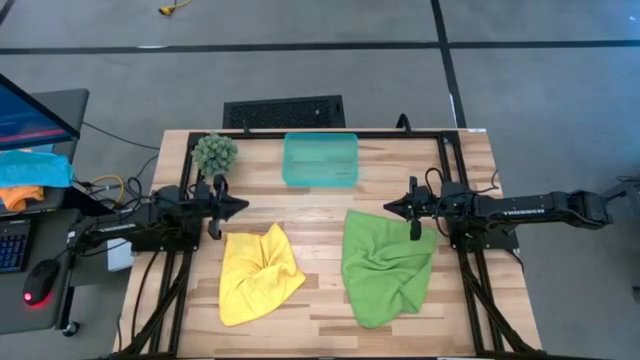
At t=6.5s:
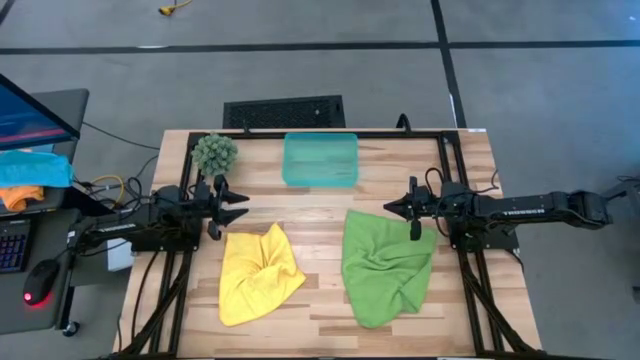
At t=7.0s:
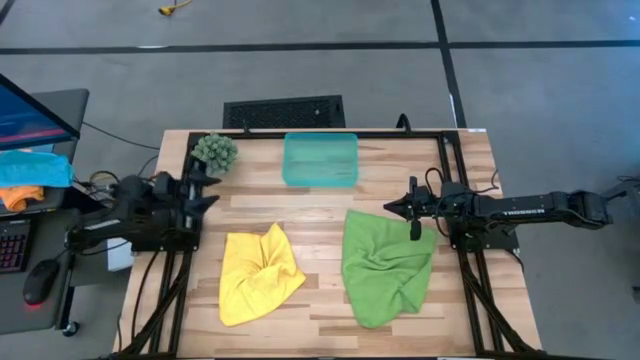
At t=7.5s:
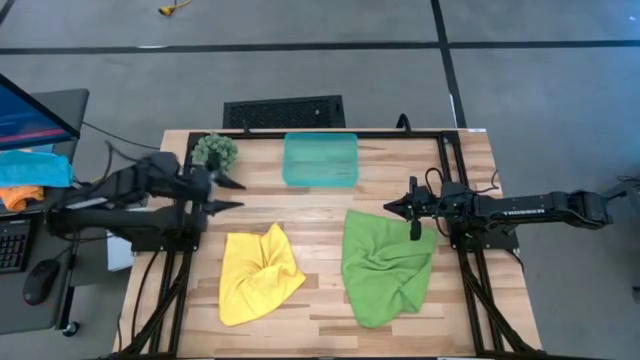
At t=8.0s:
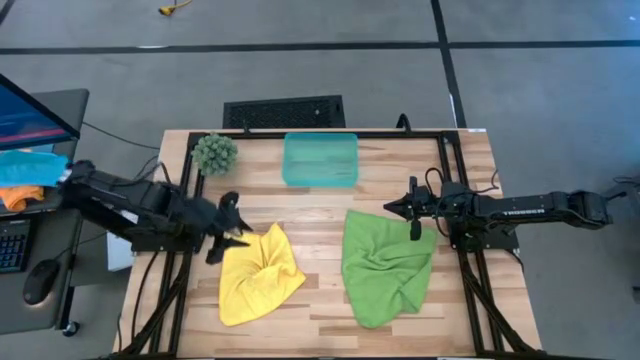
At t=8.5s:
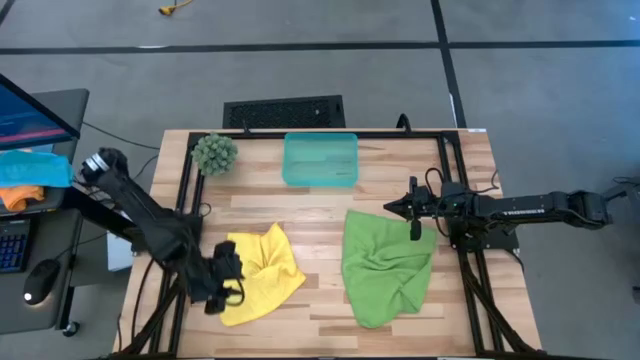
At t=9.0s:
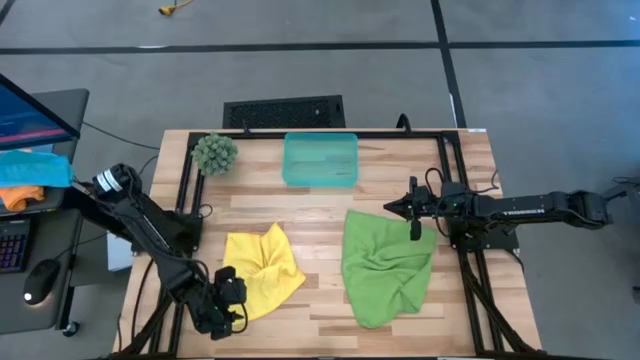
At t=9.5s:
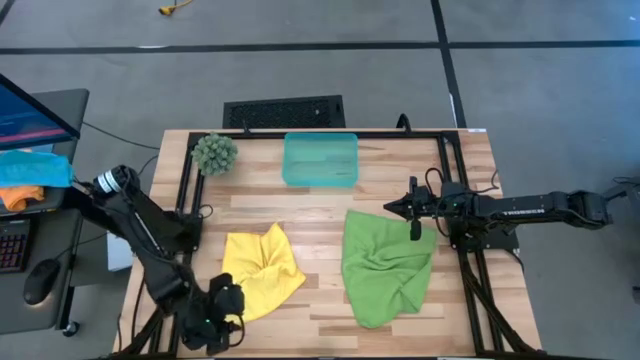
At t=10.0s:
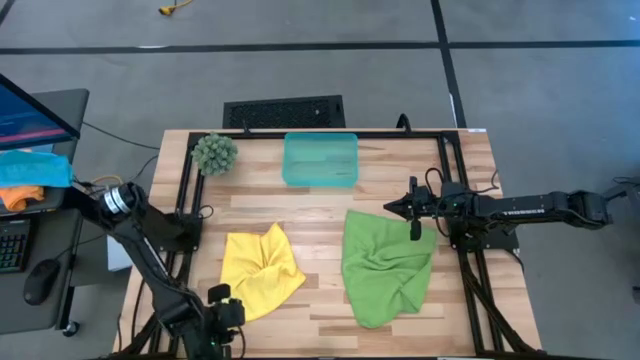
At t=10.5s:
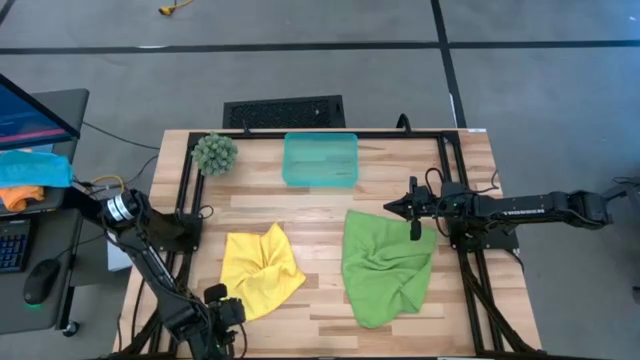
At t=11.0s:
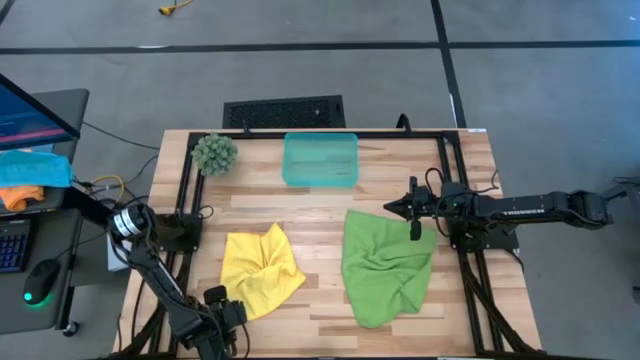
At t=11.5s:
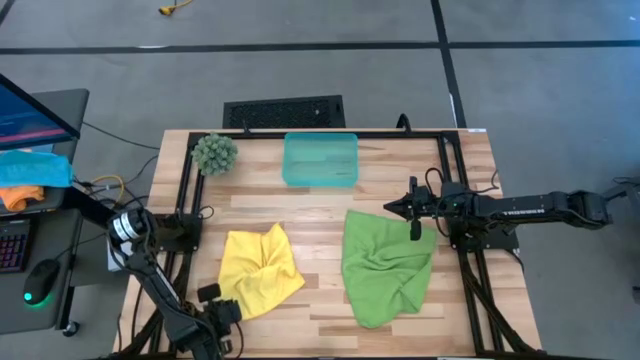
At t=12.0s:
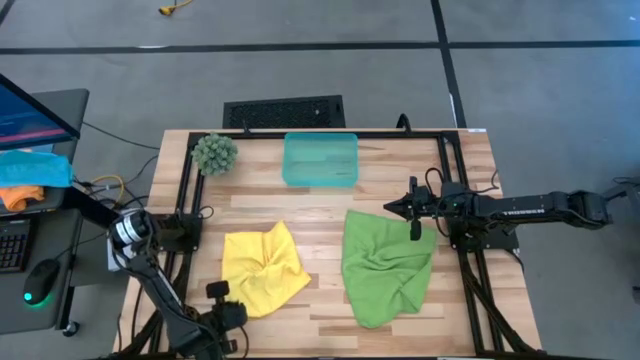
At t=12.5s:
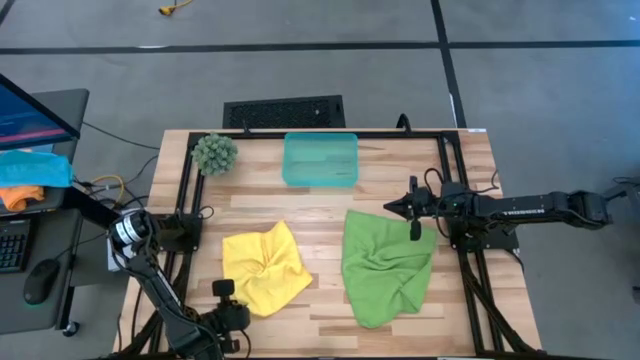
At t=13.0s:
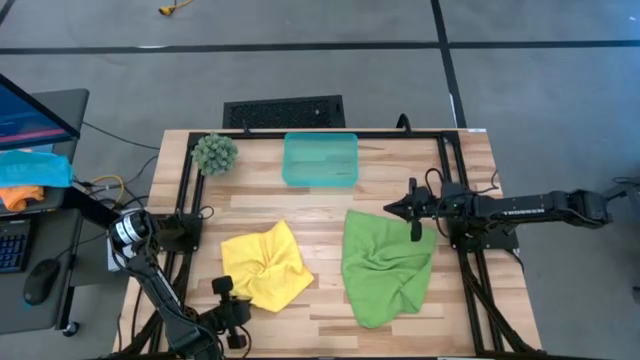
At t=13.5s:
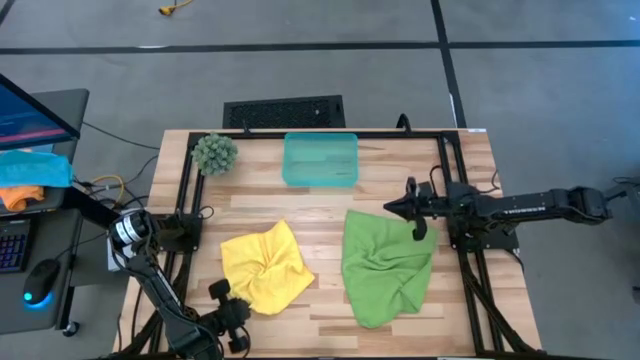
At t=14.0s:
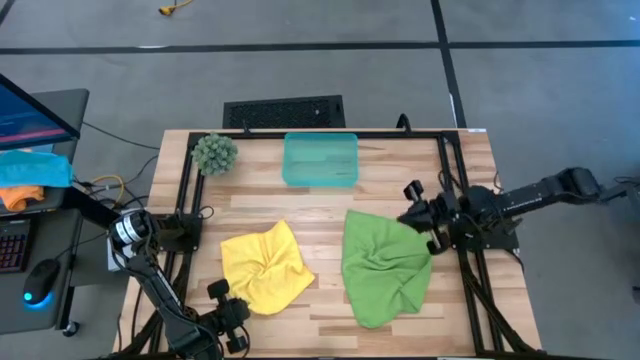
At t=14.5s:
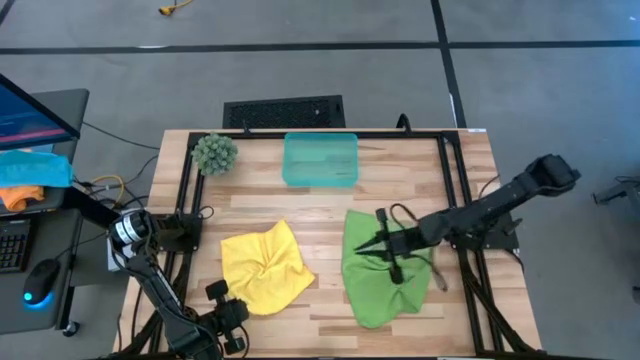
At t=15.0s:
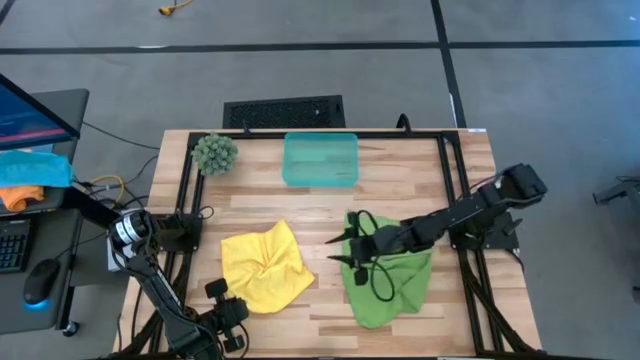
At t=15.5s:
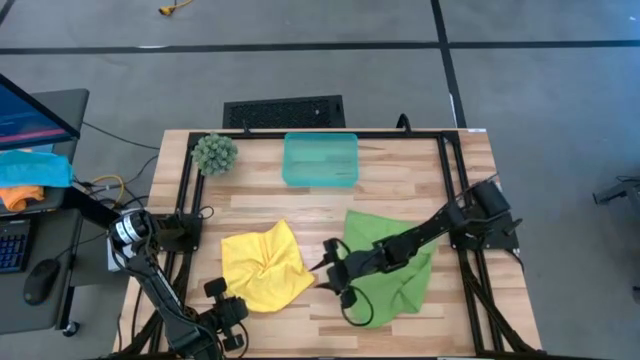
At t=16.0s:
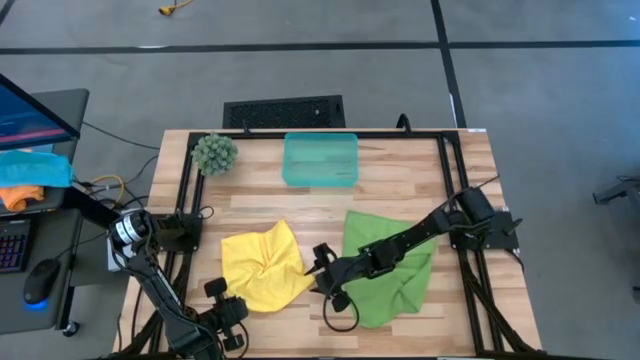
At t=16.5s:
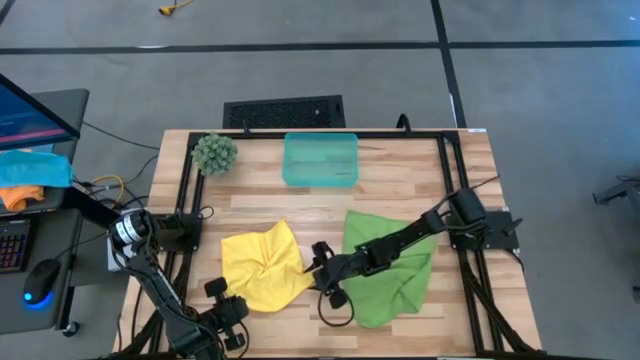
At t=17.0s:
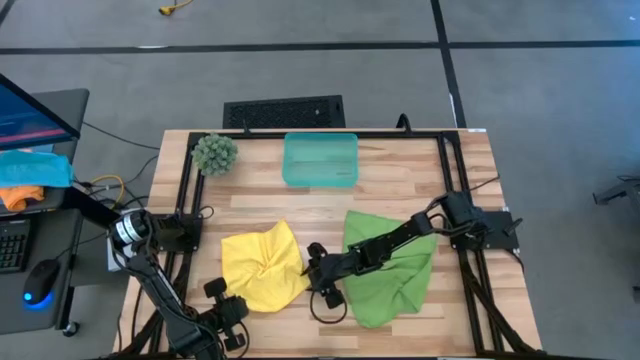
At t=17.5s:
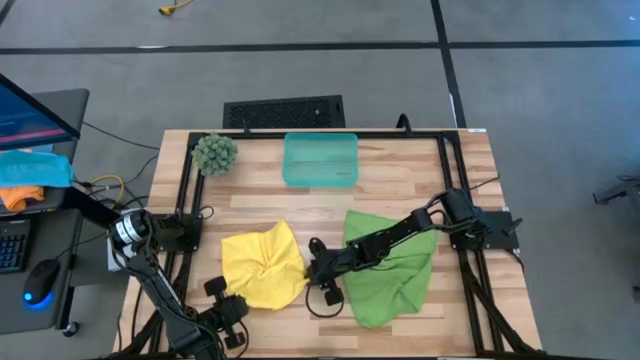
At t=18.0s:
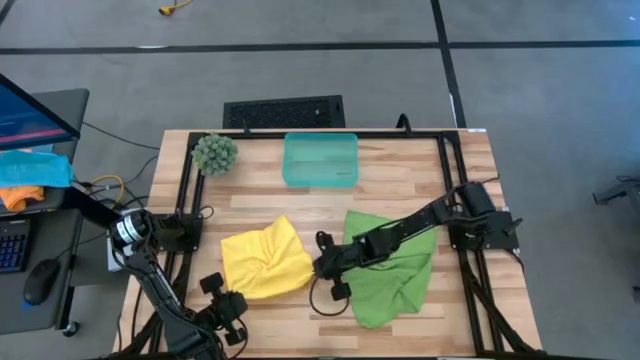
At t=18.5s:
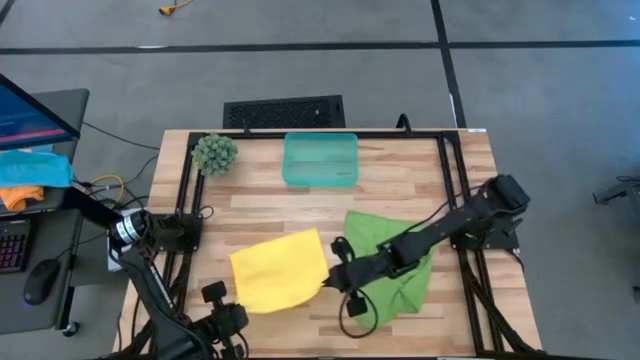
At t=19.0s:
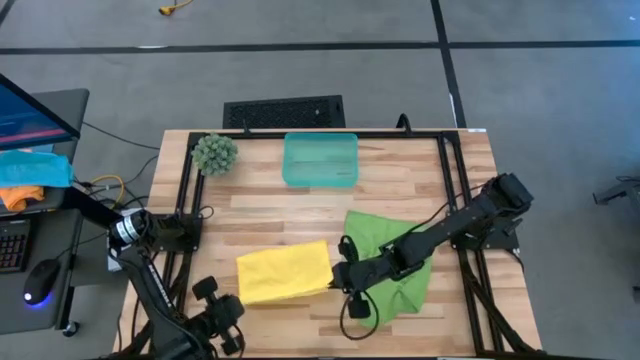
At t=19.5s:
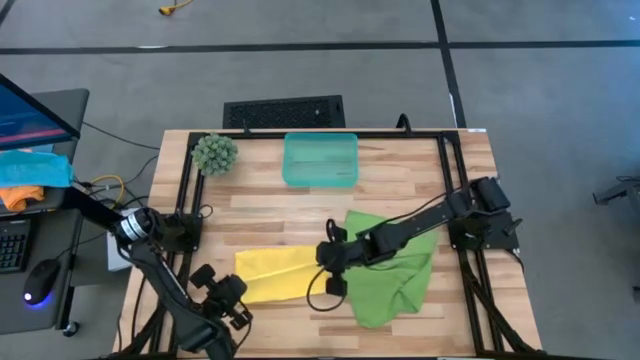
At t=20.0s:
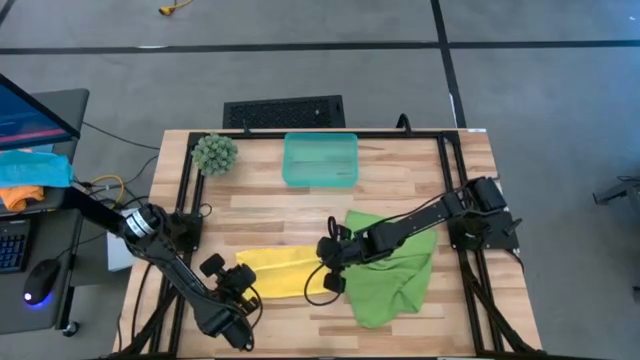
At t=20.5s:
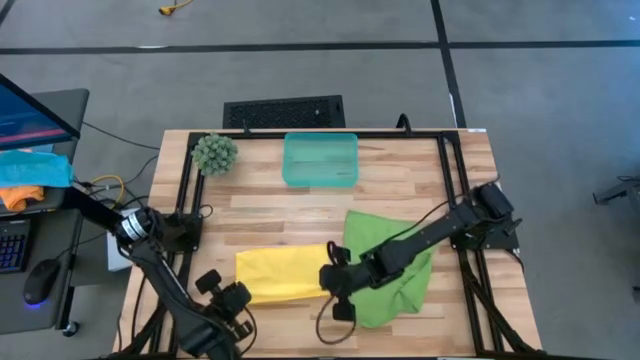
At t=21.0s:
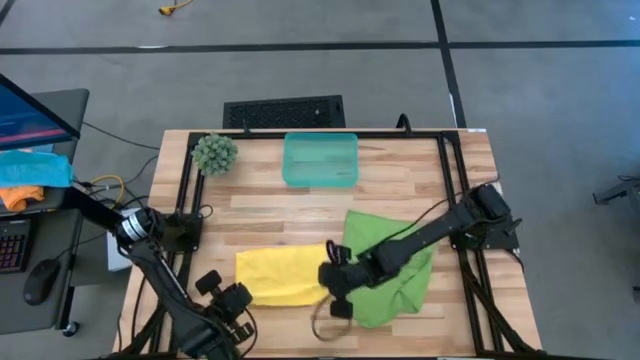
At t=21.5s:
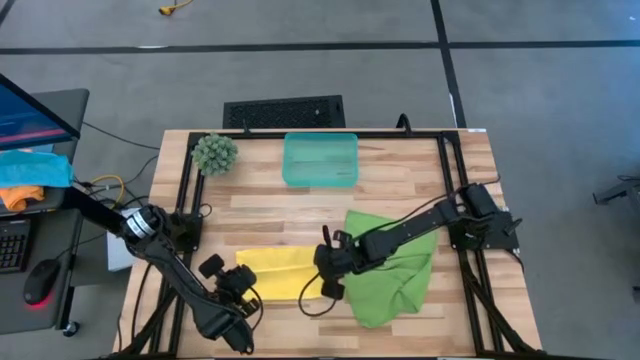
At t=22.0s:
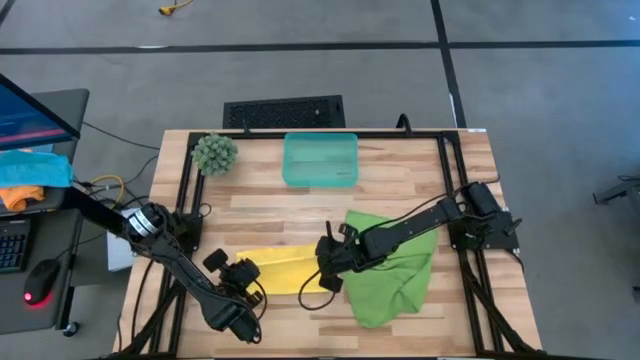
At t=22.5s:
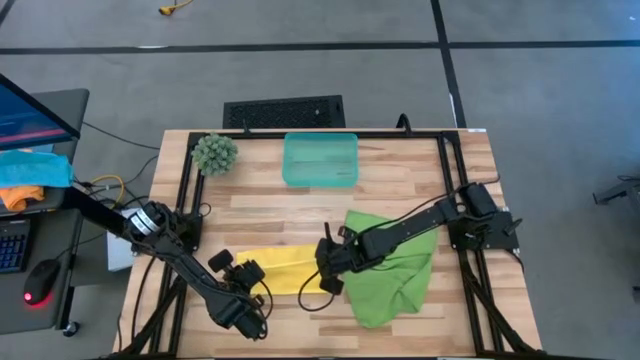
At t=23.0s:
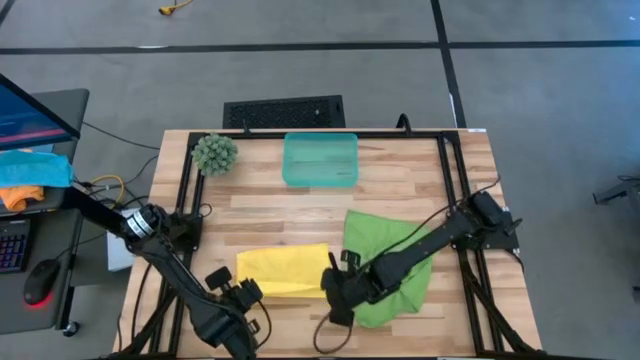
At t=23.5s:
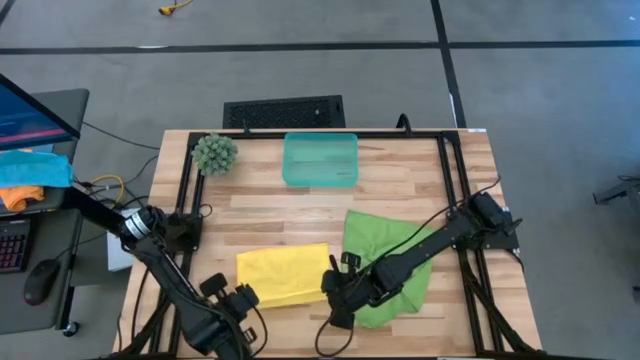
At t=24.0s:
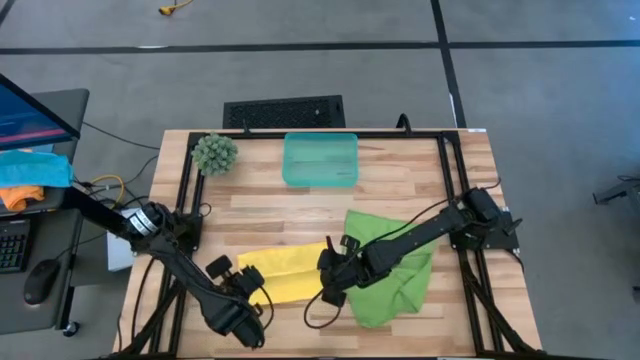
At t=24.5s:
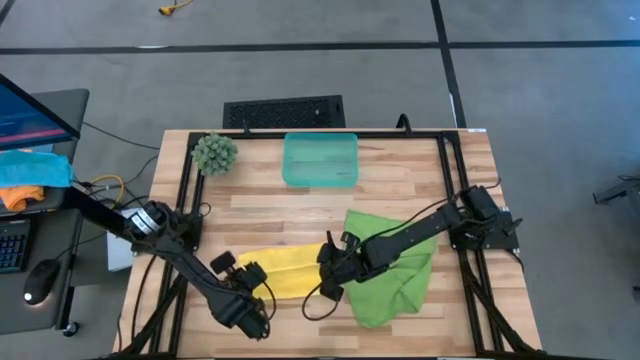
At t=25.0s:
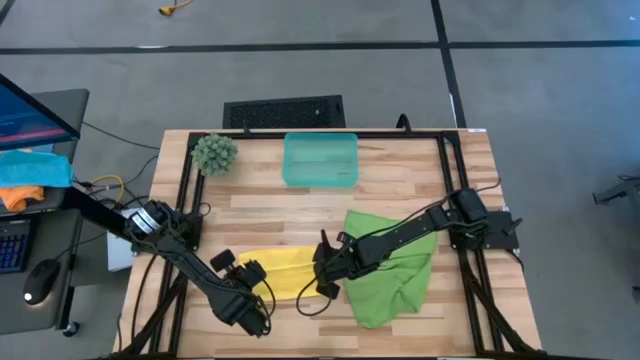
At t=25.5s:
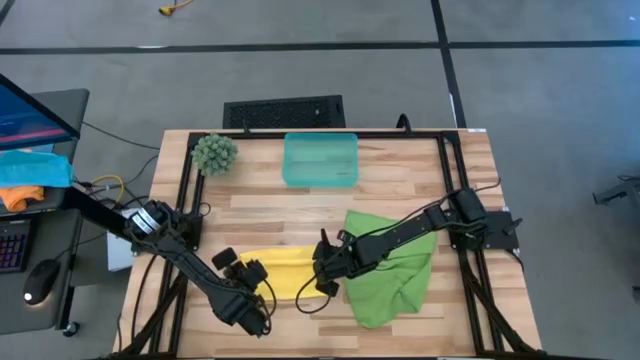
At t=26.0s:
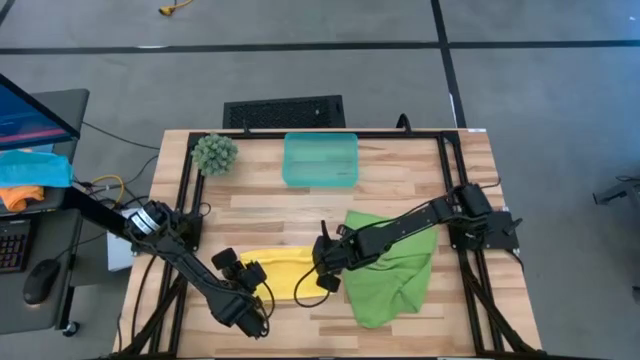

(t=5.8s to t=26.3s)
Task: Roll microfiber towels into tight, uniform cylinder then place into a basket
Fold the yellow microfiber cloth
